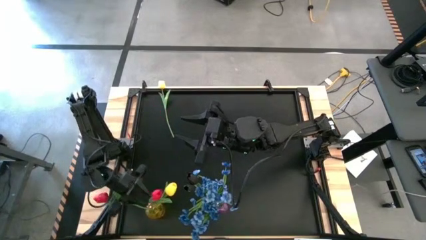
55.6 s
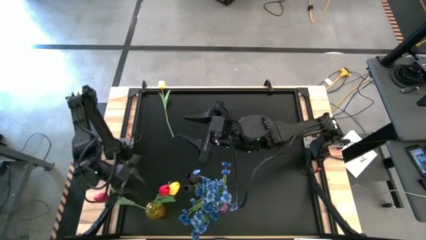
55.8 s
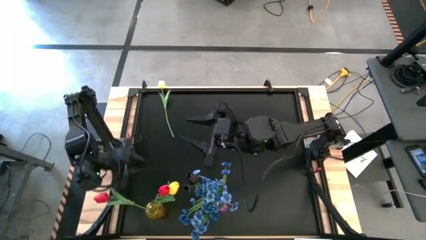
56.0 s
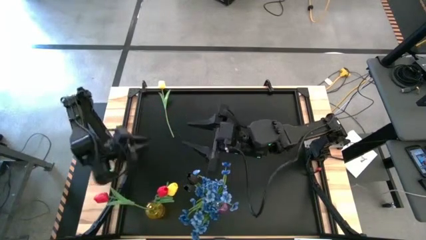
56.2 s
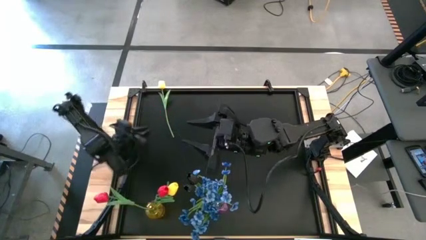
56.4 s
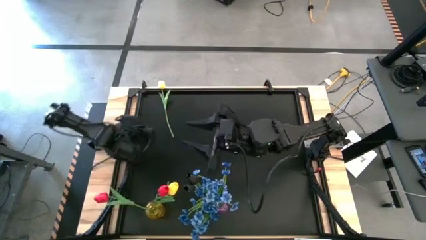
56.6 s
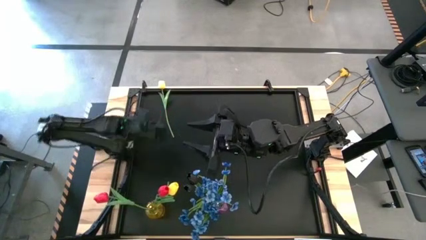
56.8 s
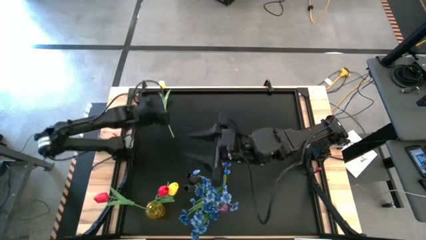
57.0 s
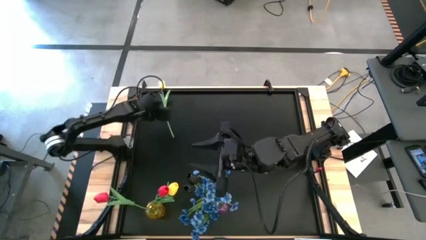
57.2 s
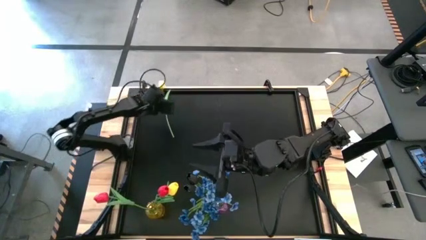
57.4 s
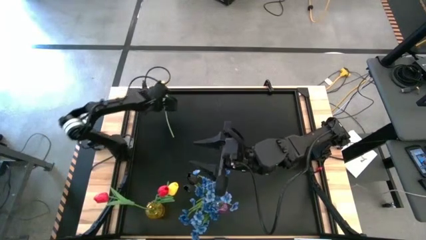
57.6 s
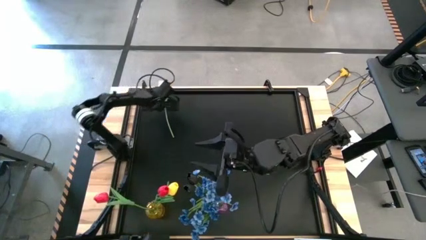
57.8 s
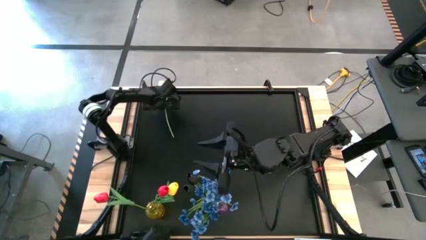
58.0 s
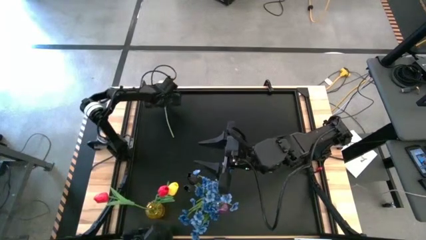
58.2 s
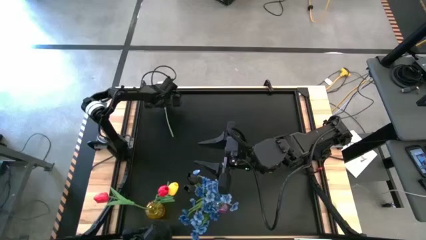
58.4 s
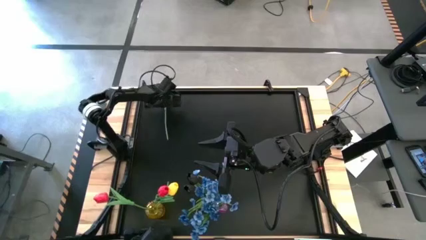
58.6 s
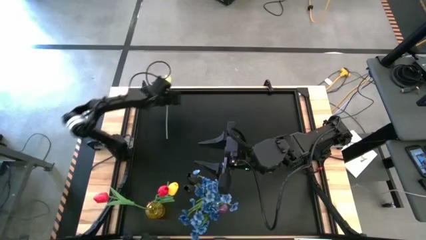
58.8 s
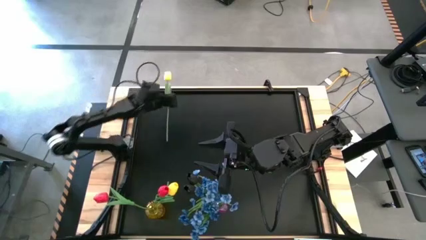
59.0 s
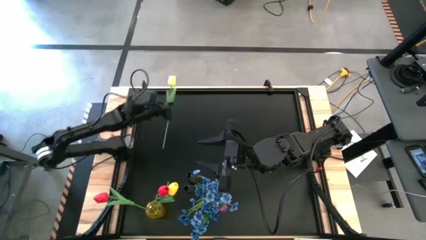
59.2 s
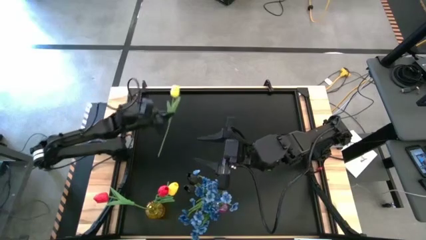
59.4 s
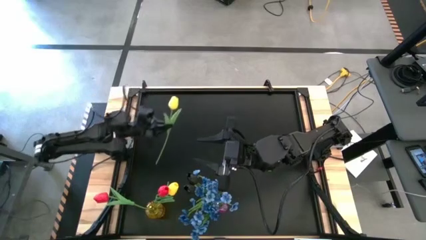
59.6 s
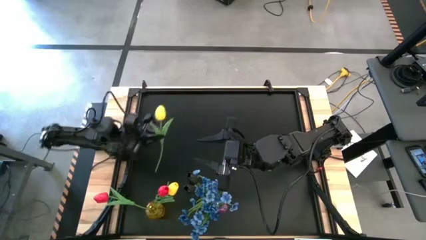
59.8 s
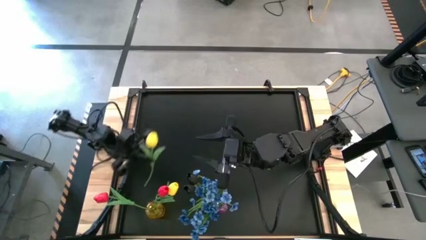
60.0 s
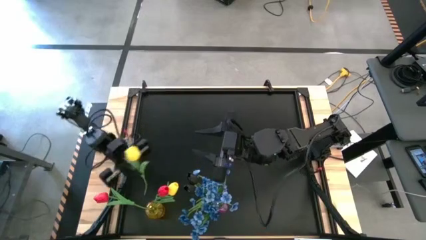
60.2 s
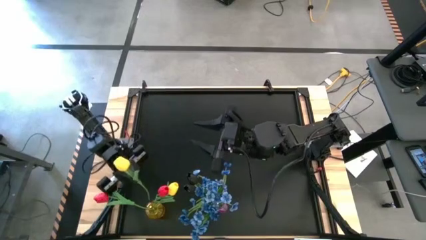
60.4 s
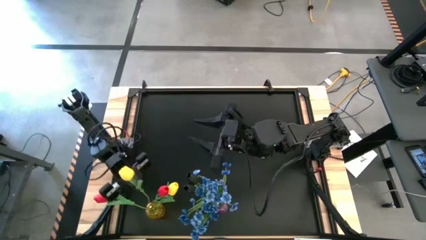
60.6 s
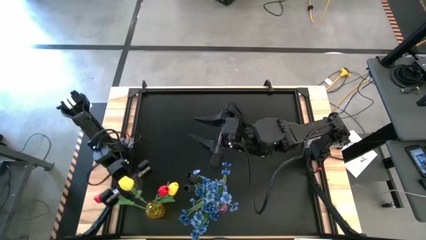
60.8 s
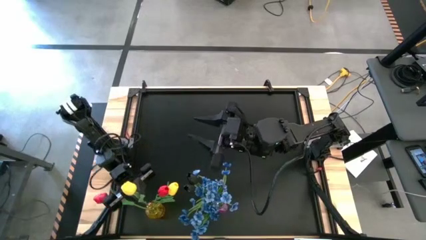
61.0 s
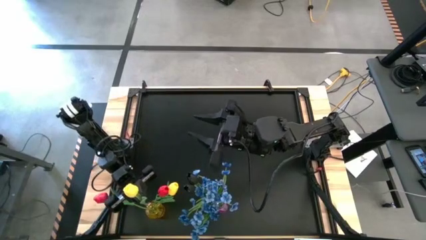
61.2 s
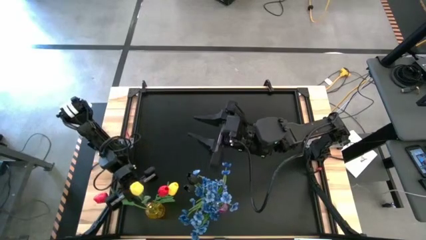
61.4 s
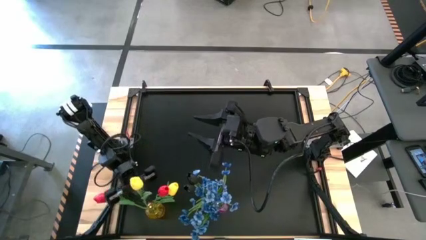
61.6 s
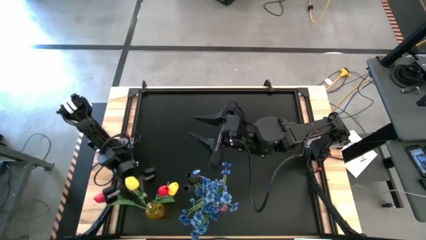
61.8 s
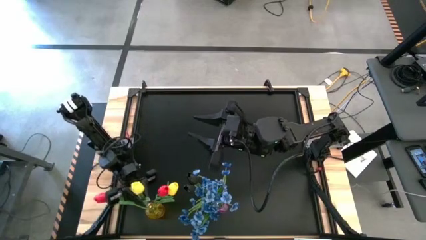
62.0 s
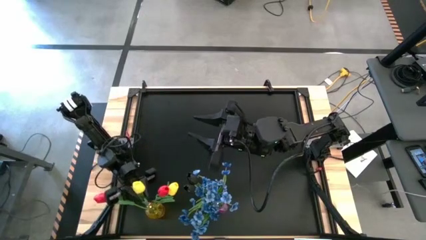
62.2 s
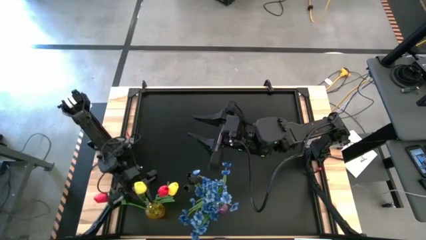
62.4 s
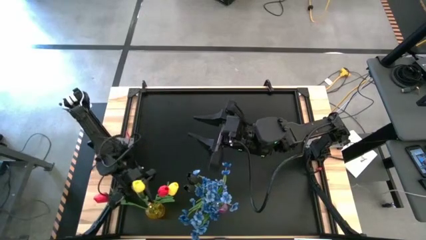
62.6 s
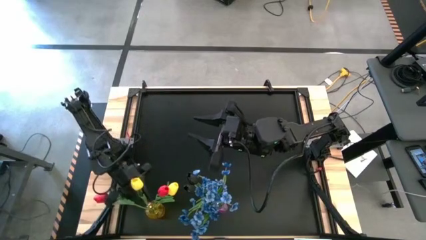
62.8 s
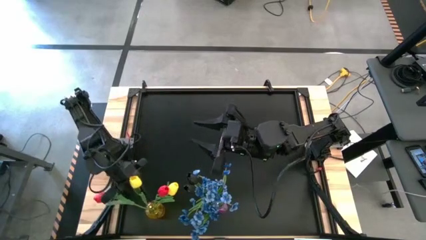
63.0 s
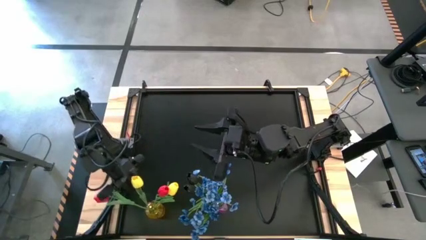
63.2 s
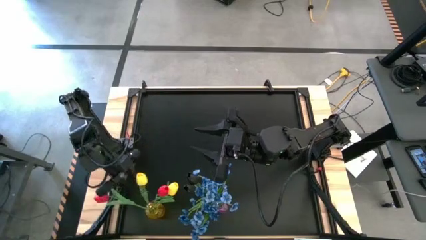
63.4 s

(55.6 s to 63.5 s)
Task: Sort flowers into vase by color
Put the yellow tulip into the yellow vase

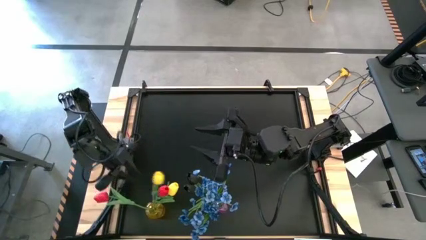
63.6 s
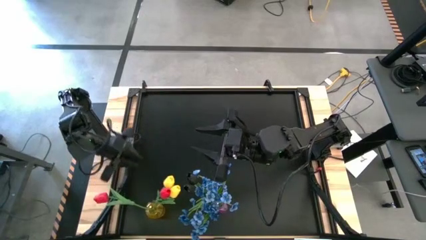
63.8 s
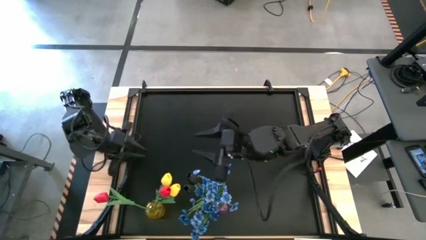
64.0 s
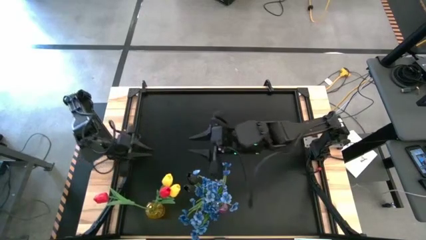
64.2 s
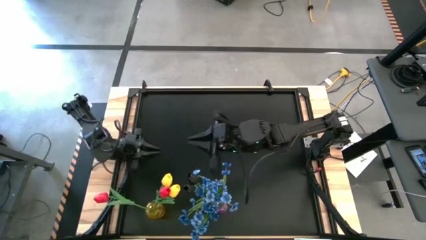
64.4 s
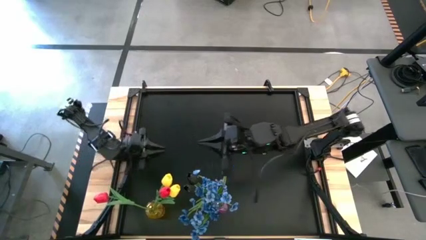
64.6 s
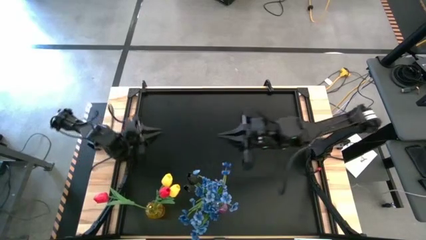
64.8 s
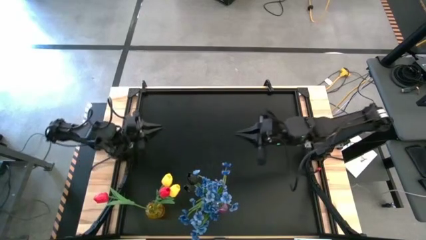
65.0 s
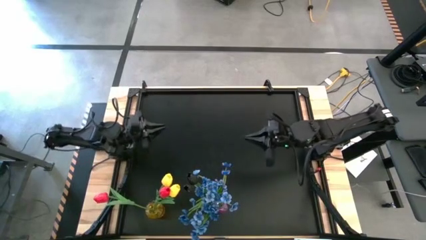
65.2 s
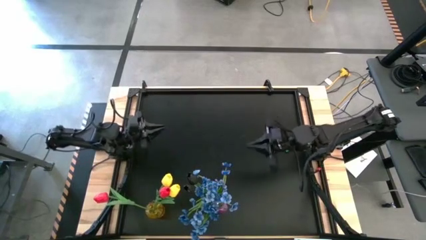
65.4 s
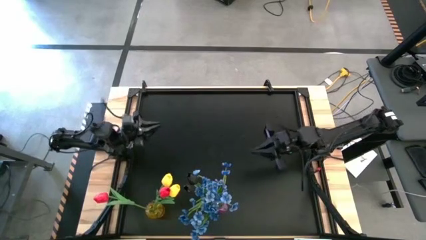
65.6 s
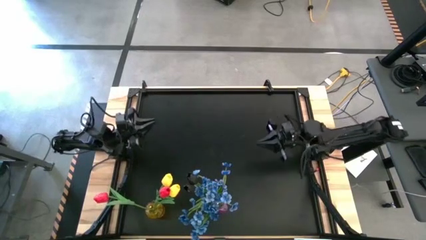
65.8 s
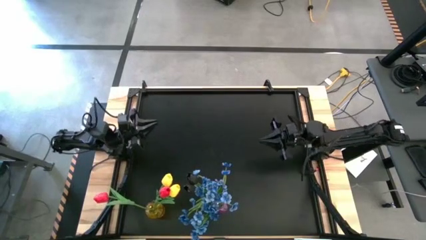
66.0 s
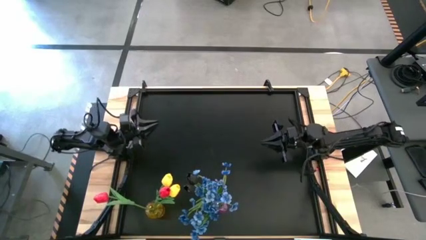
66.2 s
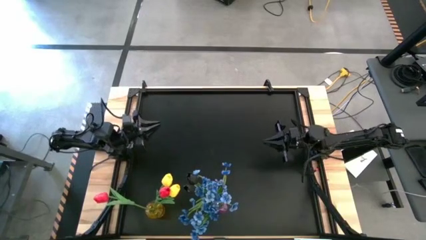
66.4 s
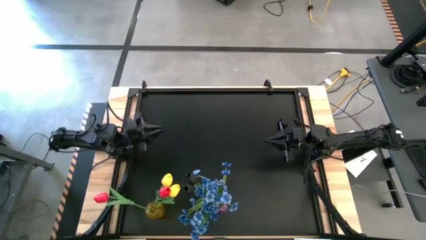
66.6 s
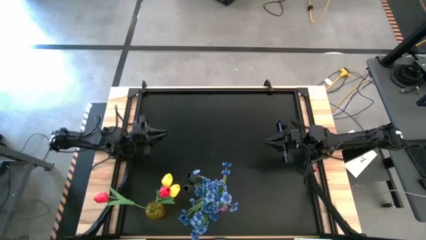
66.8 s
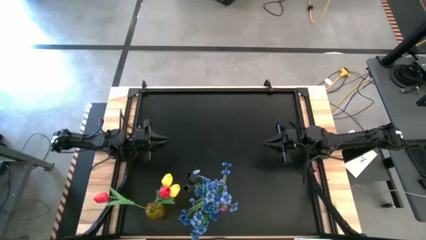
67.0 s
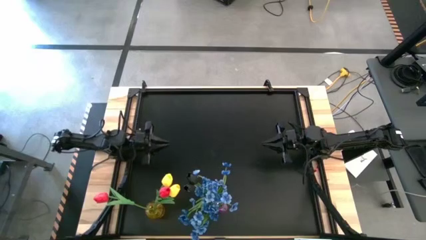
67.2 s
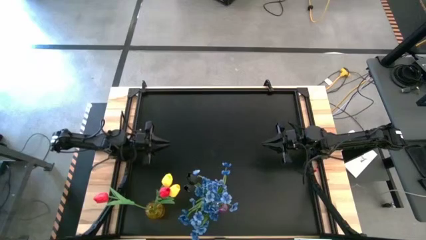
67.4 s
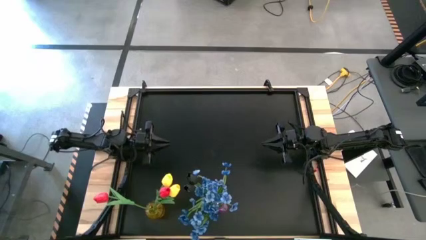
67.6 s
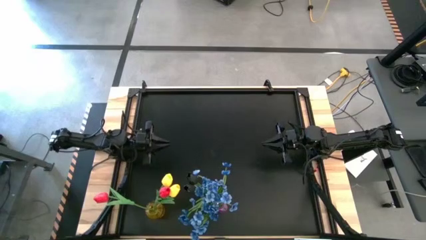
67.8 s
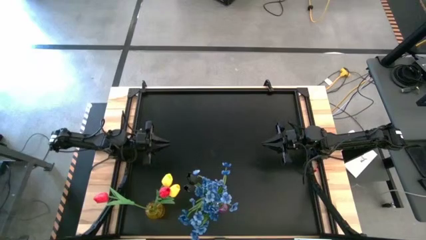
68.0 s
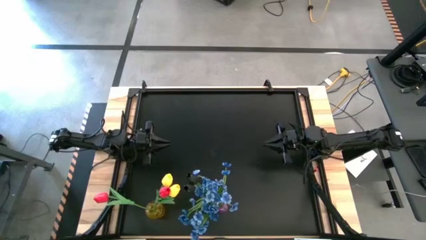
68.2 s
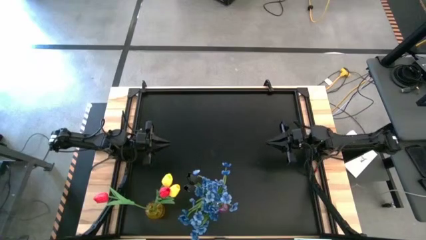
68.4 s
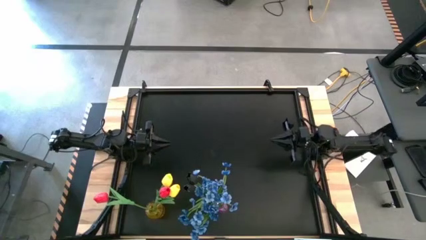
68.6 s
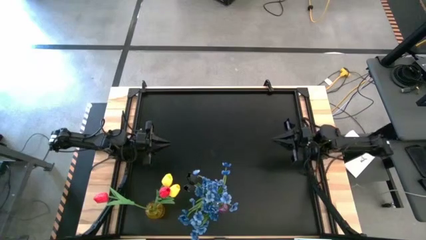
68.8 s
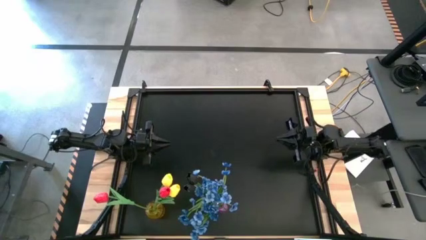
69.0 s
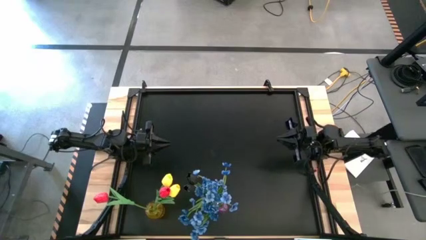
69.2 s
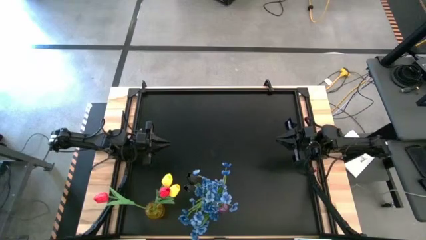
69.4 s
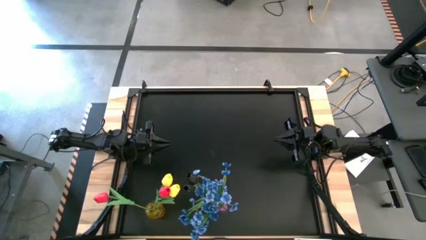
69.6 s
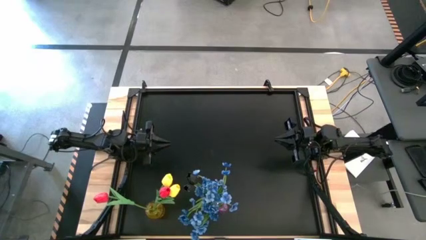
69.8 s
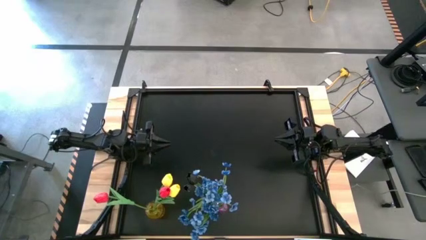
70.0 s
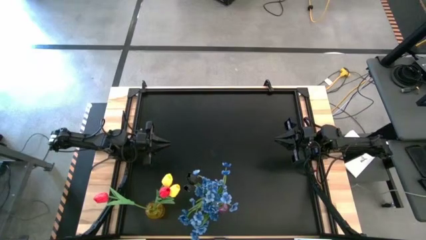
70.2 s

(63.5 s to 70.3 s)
Return to Home Position

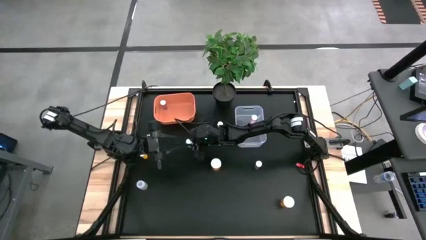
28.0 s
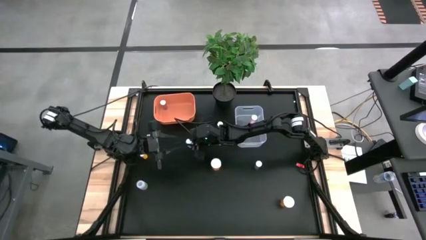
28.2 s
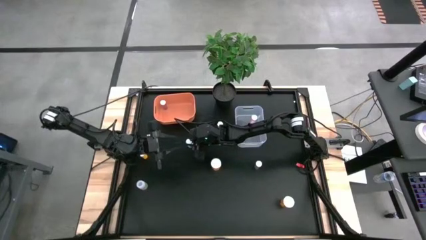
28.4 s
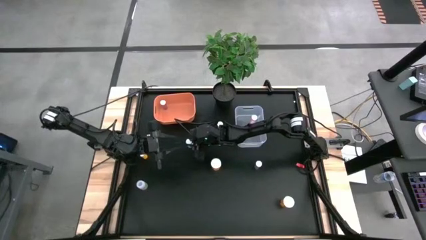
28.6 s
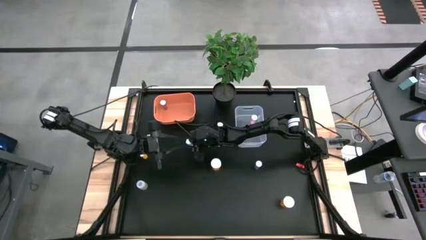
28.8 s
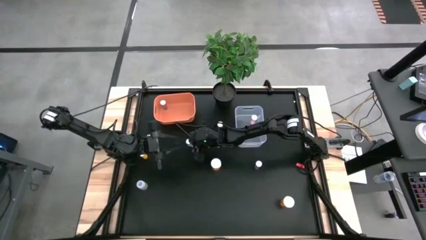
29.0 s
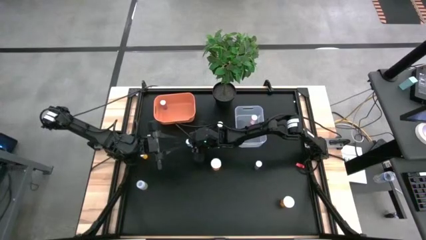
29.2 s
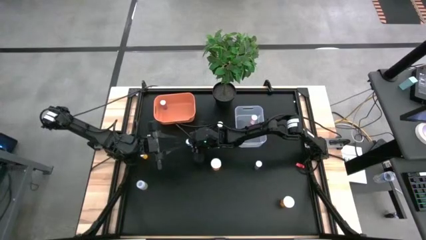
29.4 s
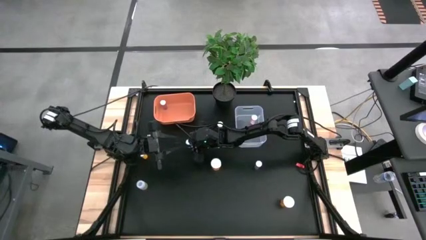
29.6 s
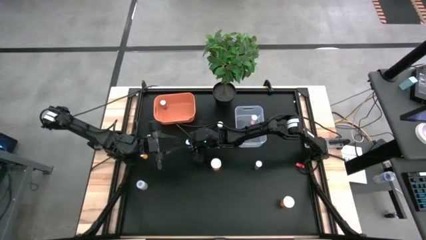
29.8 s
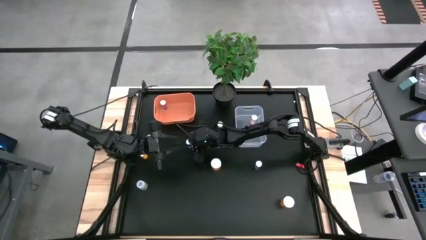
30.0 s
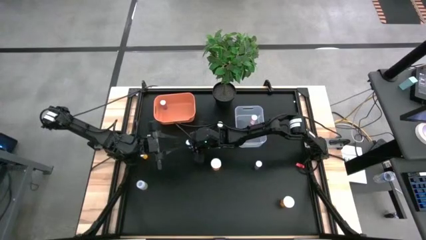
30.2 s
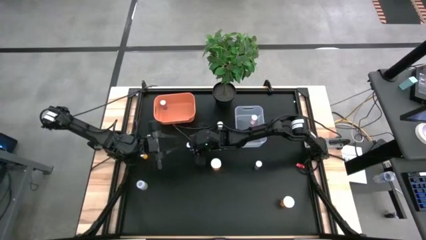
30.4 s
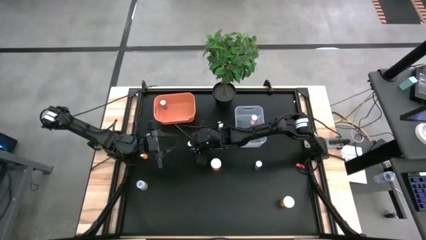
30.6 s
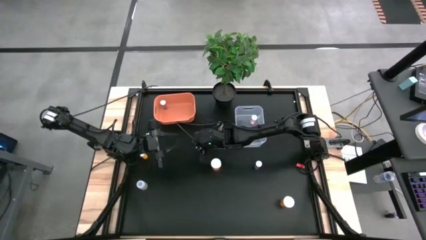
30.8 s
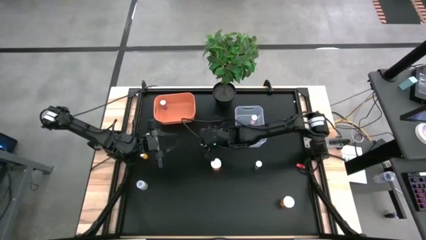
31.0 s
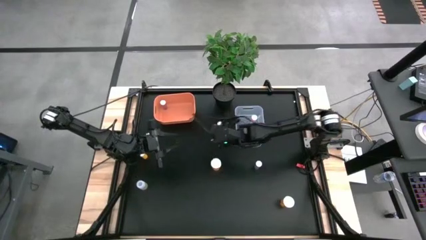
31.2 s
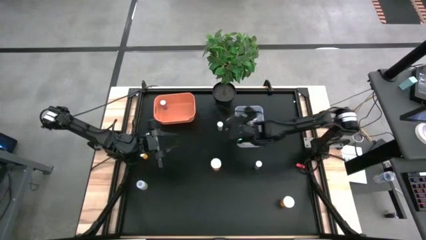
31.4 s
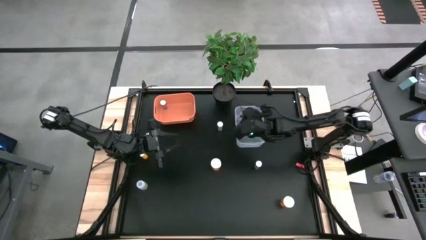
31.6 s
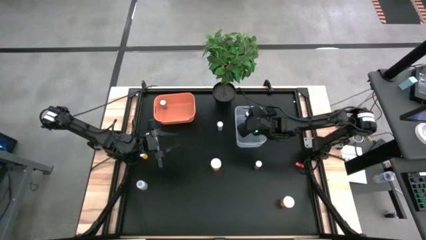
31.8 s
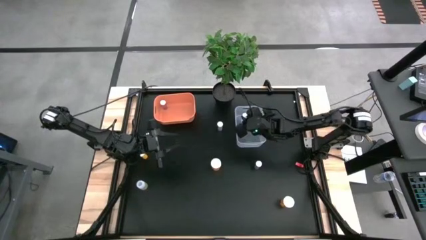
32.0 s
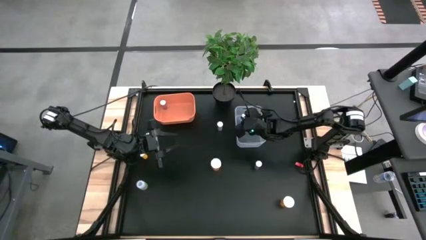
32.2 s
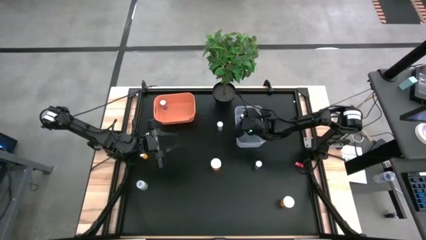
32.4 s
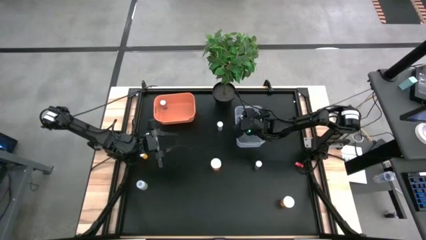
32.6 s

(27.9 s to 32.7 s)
Task: Pick and place medicine bottles into bin by pill shape (circle, oval)
Put the blue capsule pill bottle into the transparent bin
